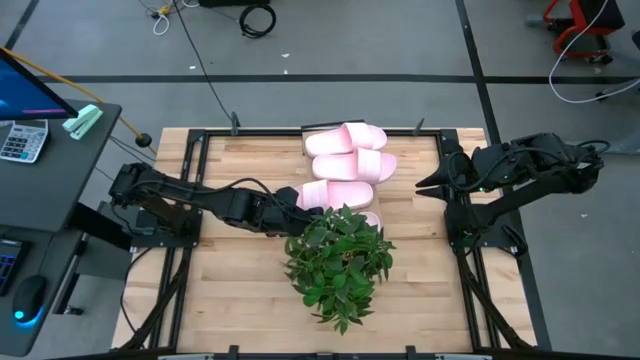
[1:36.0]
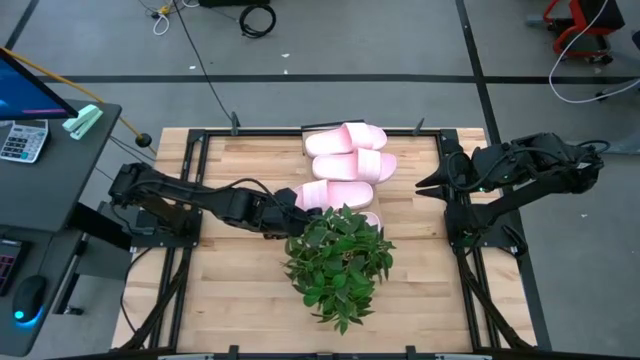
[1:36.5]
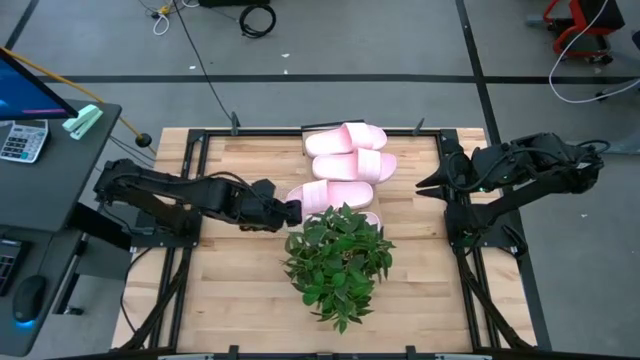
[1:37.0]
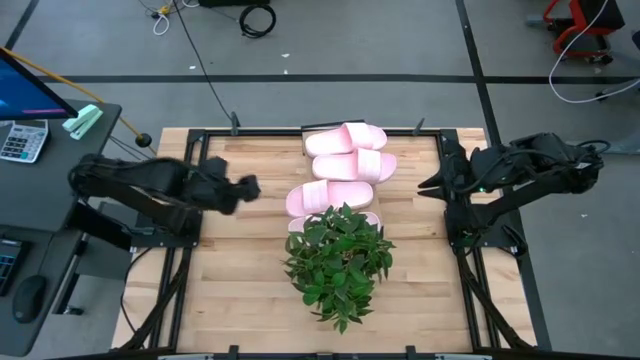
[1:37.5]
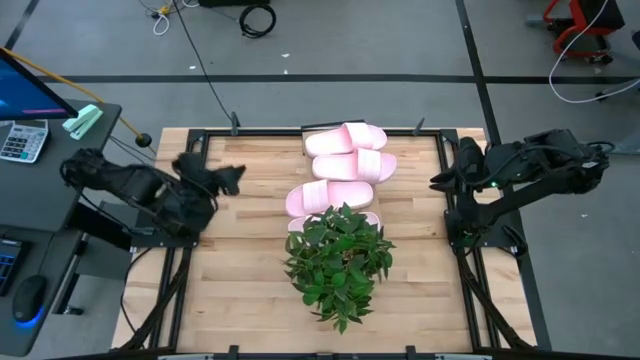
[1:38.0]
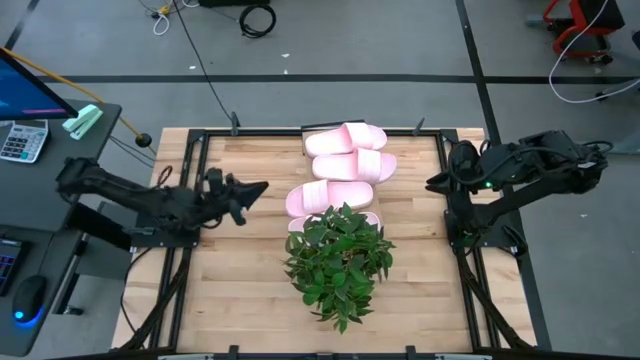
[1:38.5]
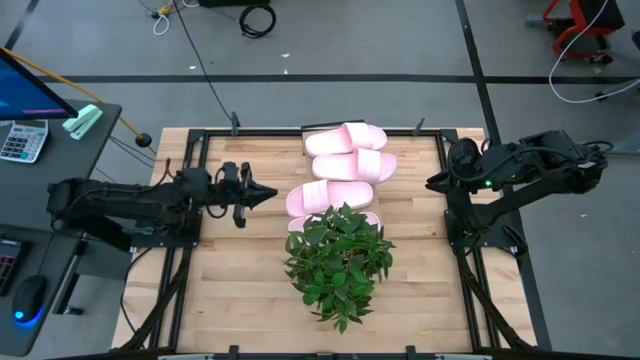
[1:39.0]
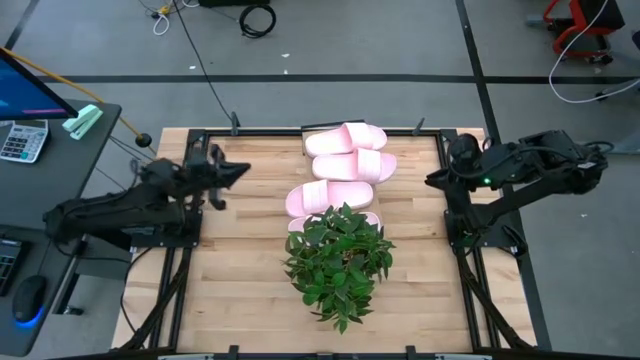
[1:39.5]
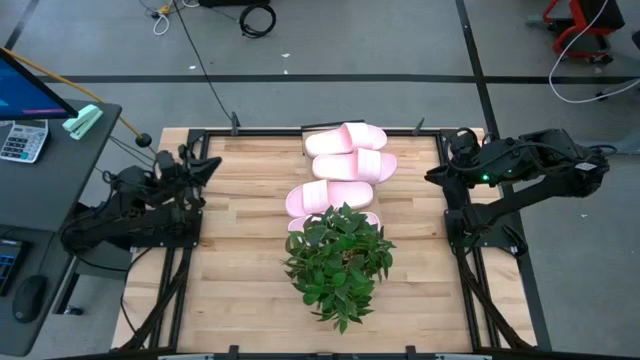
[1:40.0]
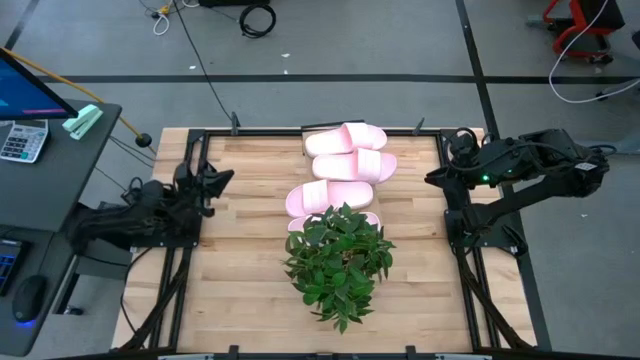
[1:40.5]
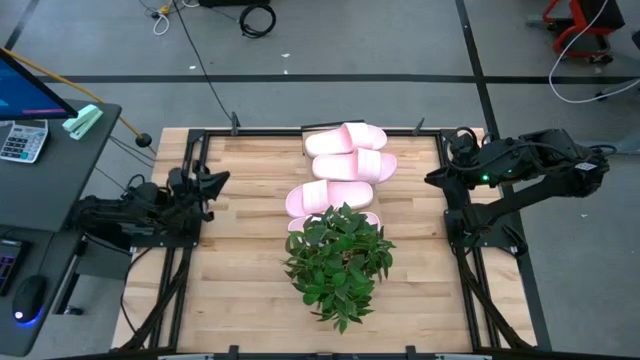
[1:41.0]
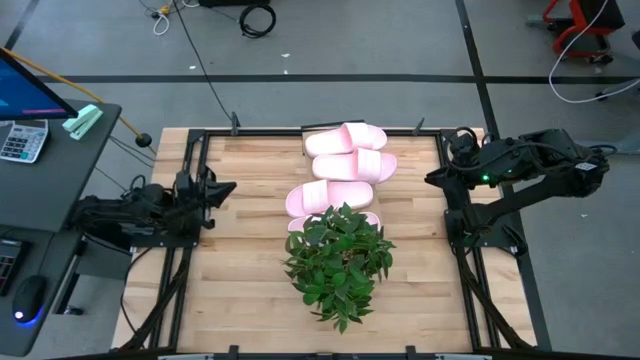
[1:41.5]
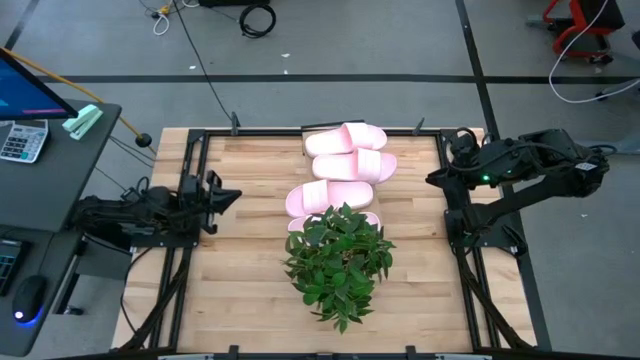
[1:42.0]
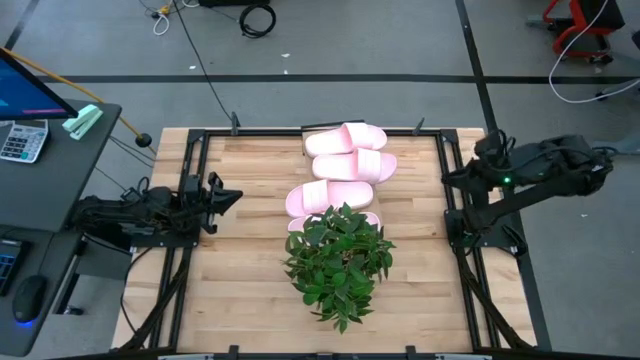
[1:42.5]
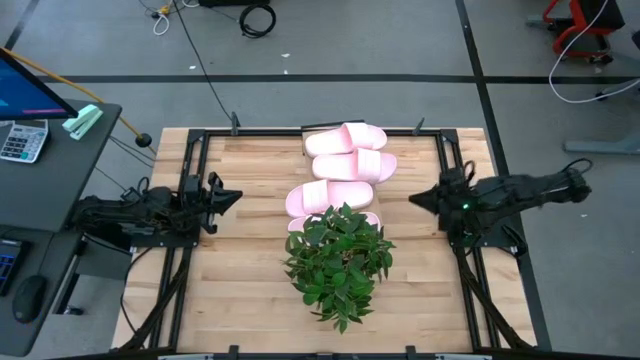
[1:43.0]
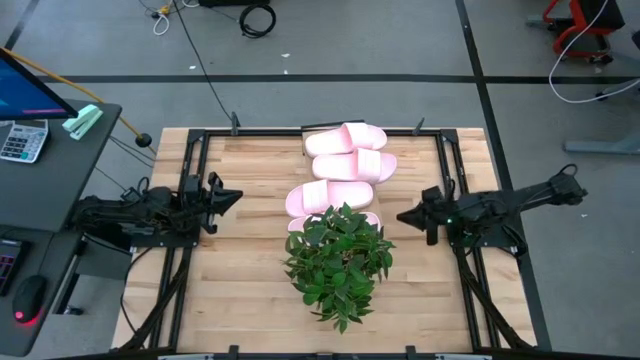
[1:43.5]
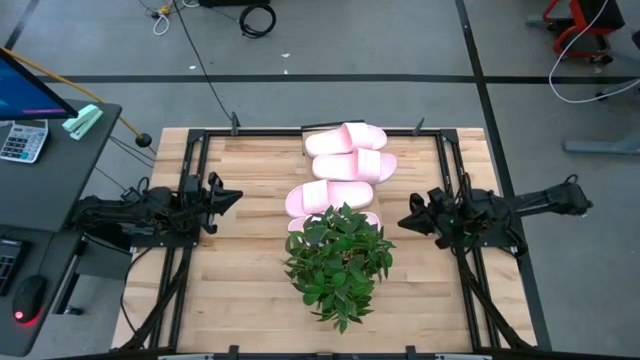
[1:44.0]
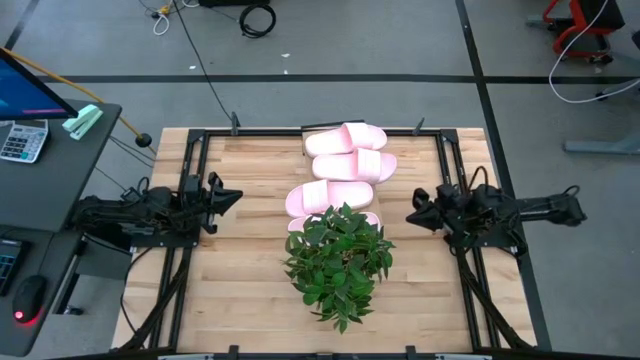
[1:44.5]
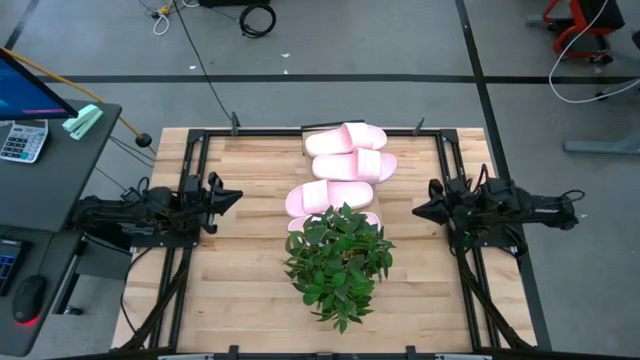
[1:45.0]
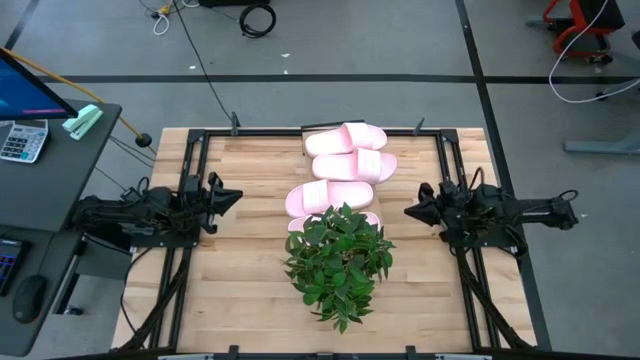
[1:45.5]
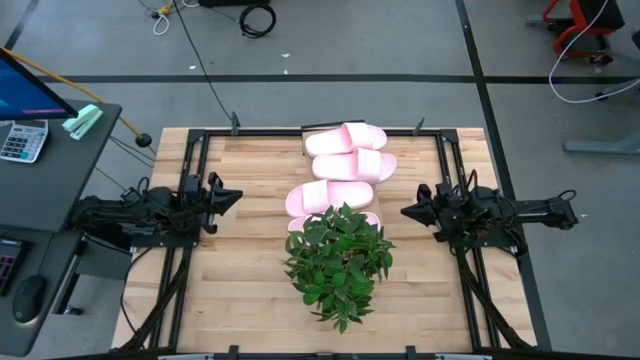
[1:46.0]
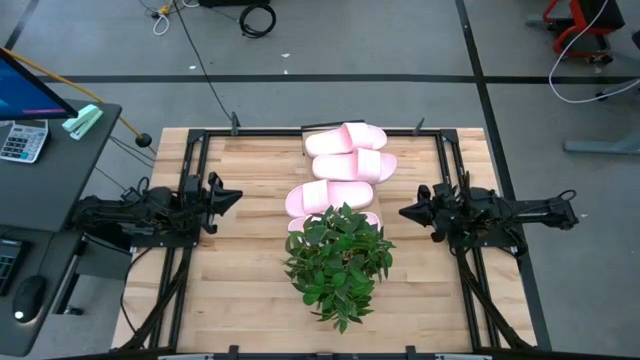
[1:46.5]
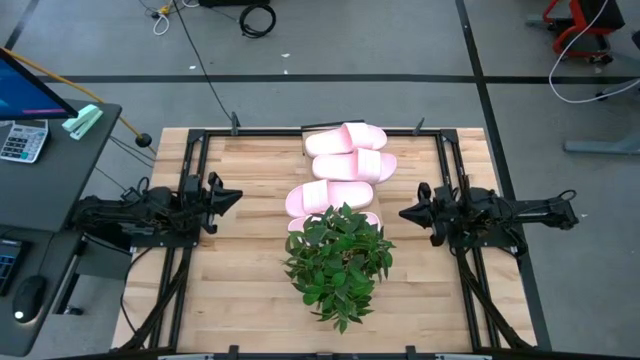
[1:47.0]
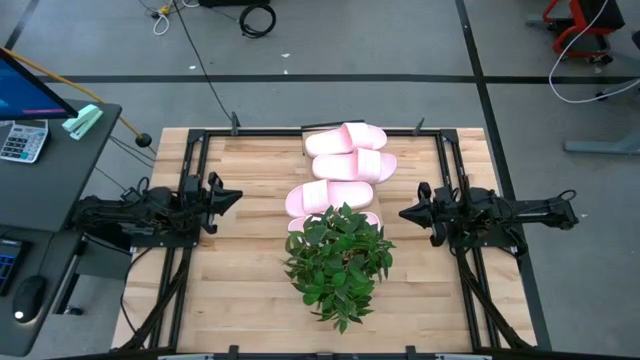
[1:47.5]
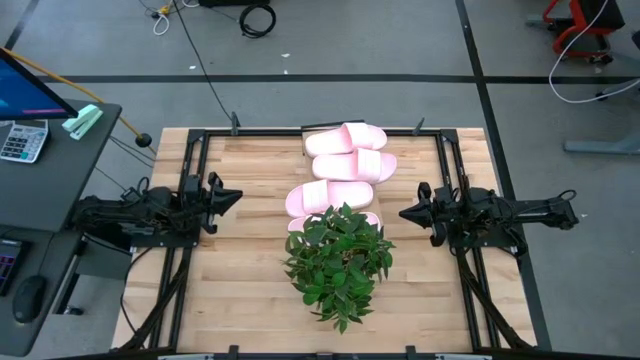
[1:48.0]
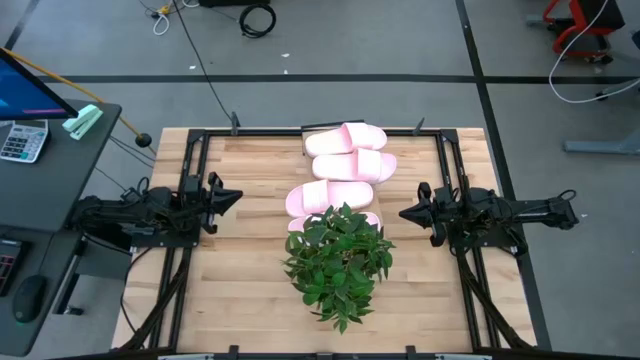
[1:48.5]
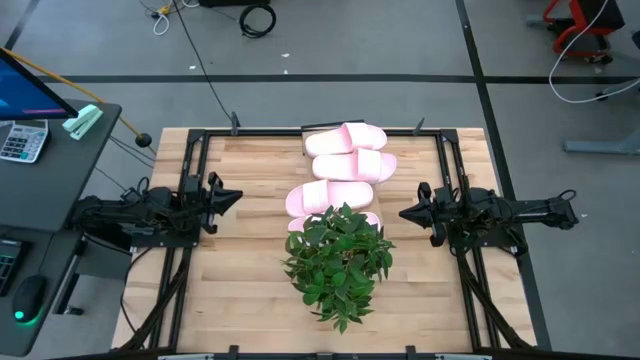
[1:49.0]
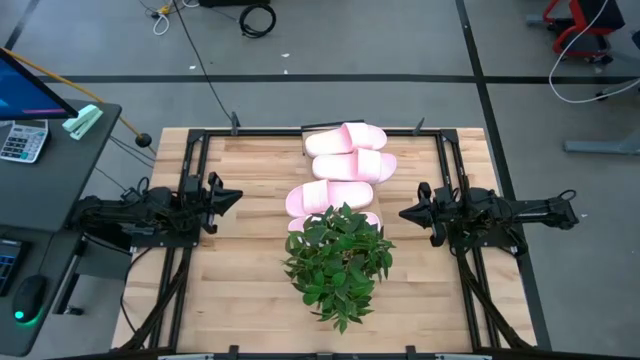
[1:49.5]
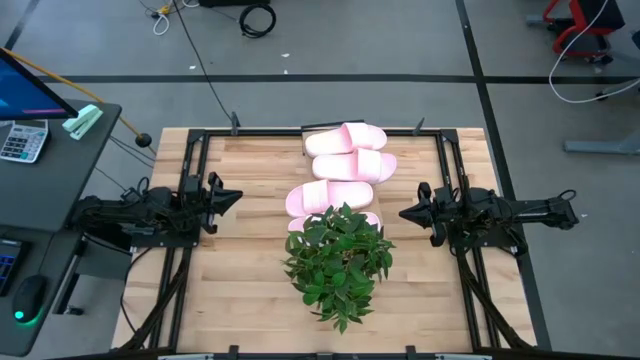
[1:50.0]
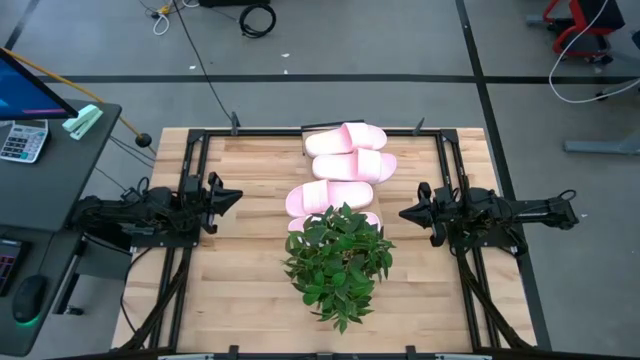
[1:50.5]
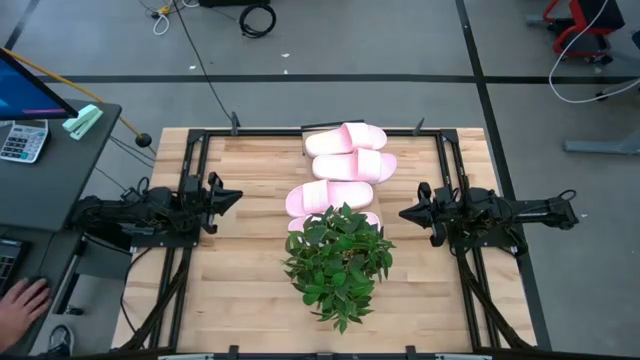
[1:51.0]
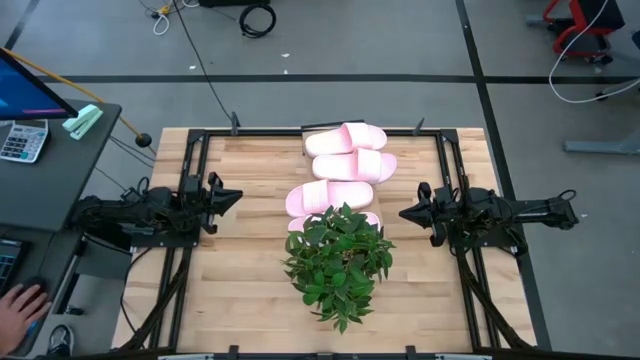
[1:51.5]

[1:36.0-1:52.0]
Task: Pick and place slides into the shelf
Return to Home Position

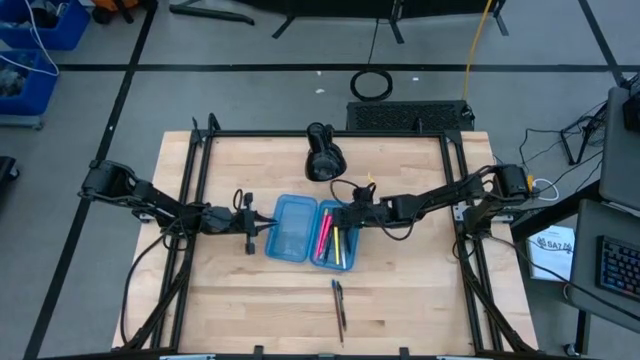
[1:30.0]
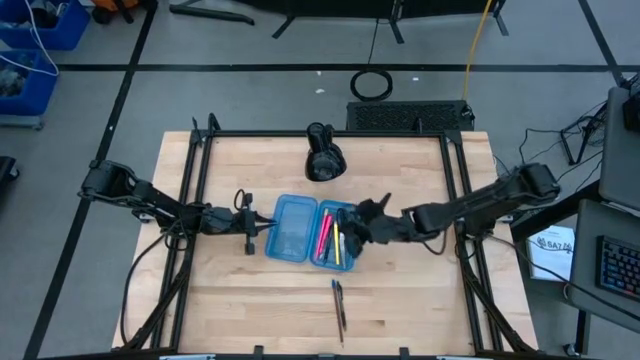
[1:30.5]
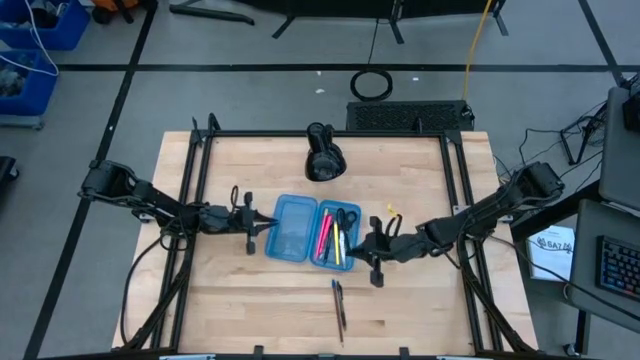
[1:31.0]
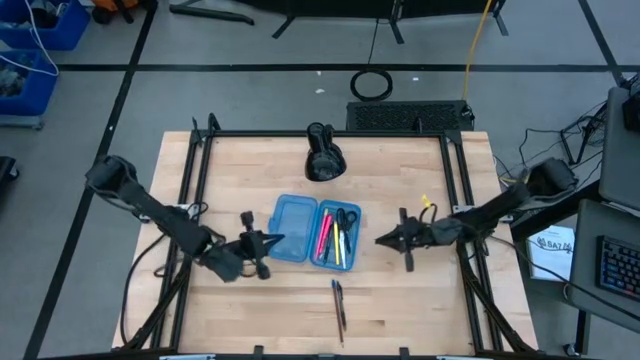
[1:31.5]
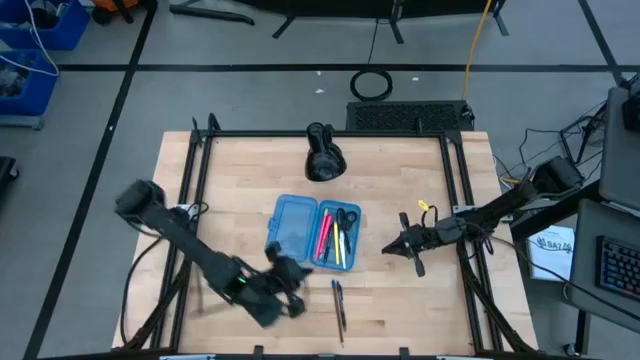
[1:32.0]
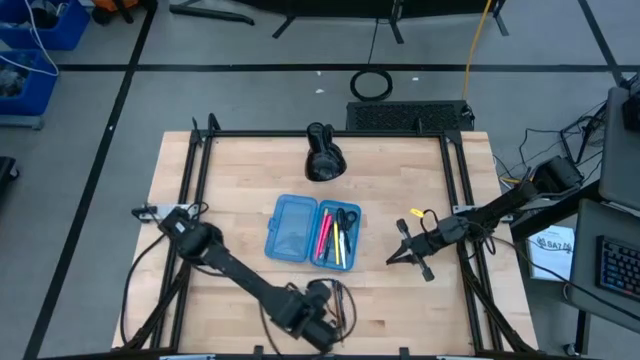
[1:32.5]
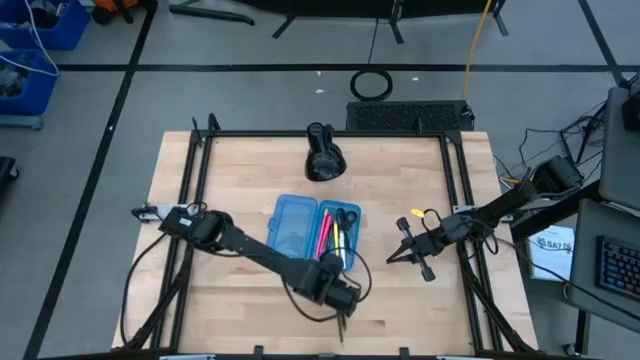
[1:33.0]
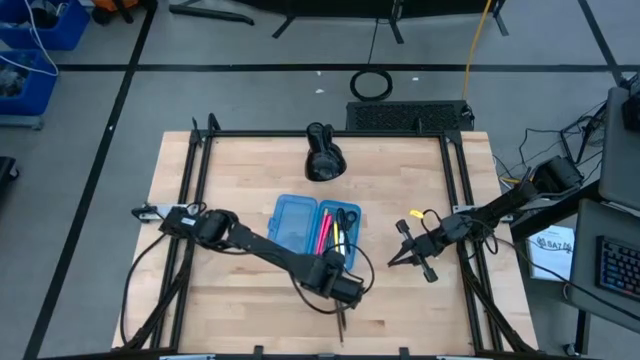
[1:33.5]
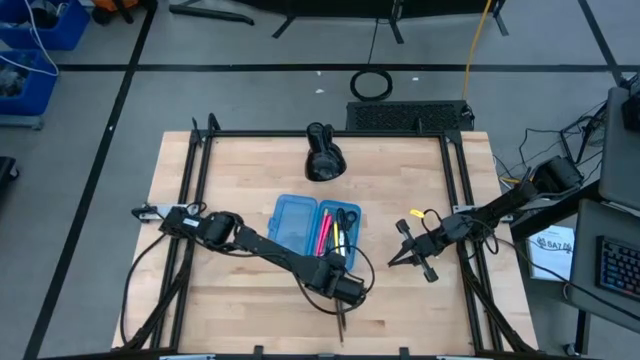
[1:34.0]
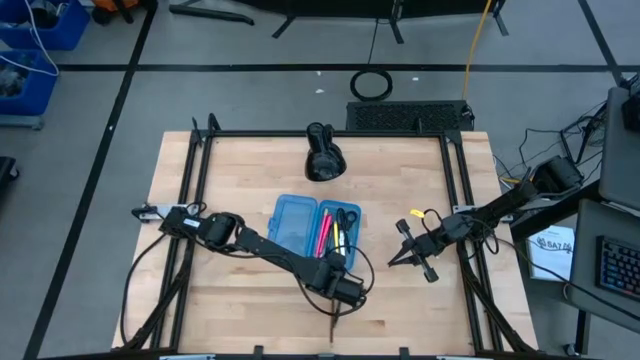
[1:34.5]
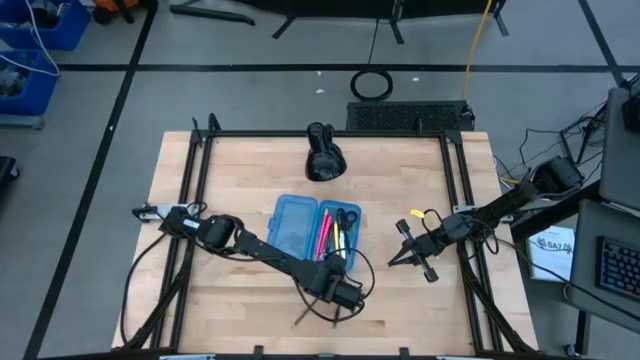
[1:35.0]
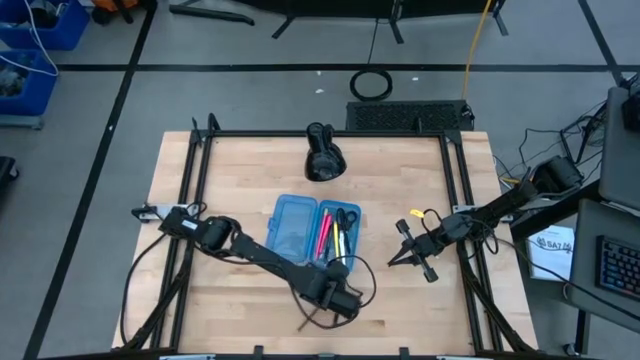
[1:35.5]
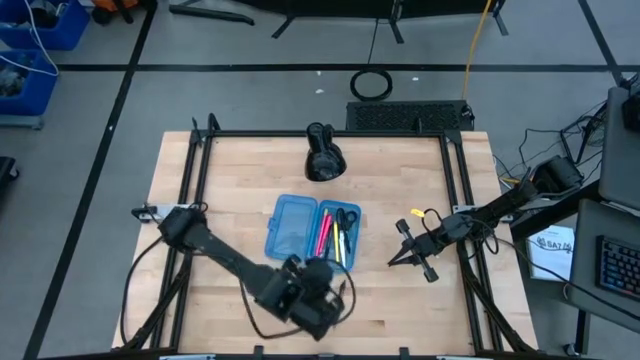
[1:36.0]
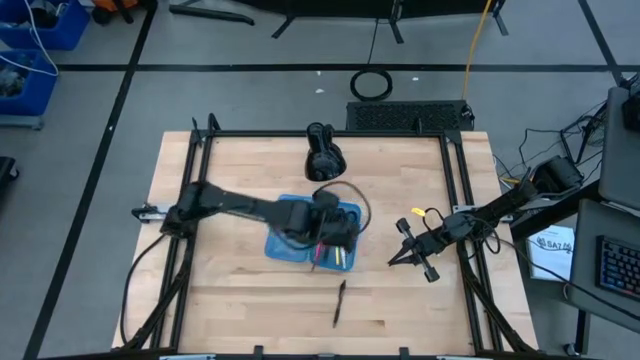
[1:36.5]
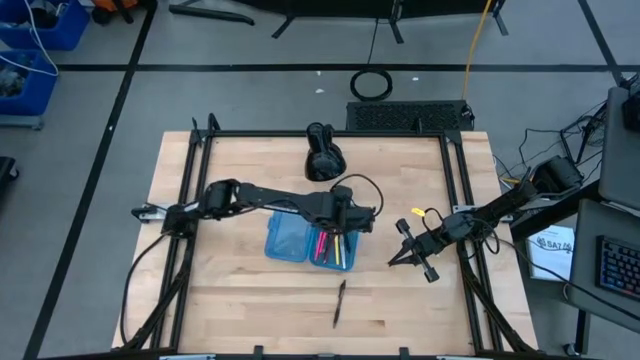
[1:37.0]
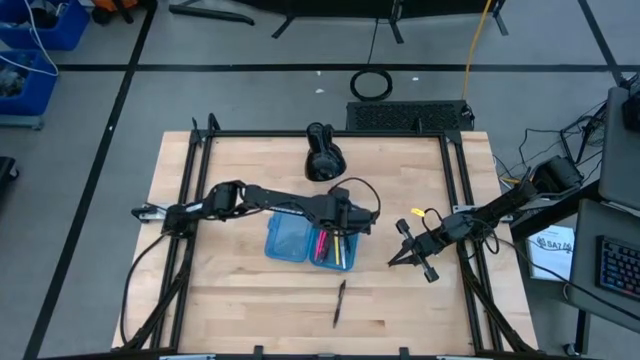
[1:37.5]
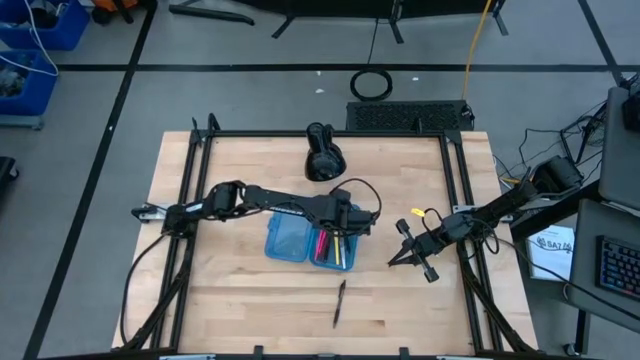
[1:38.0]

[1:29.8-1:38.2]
Task: Pick & place school supplies into a supply box
Put the brown pencil into the blue supply box
